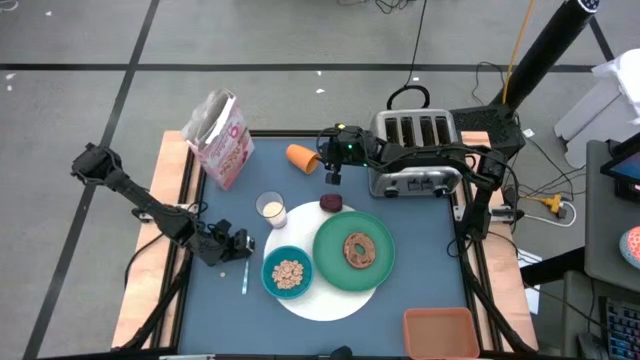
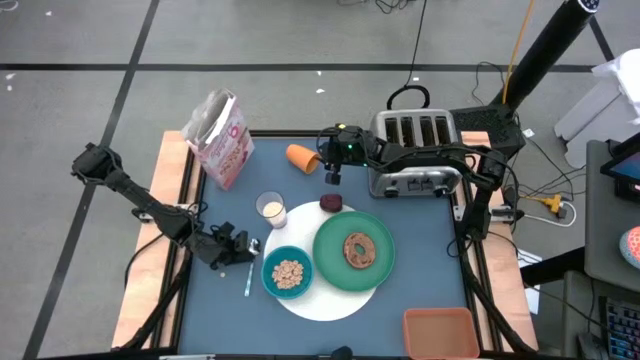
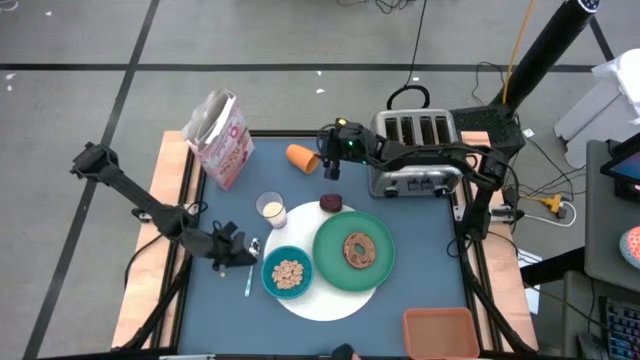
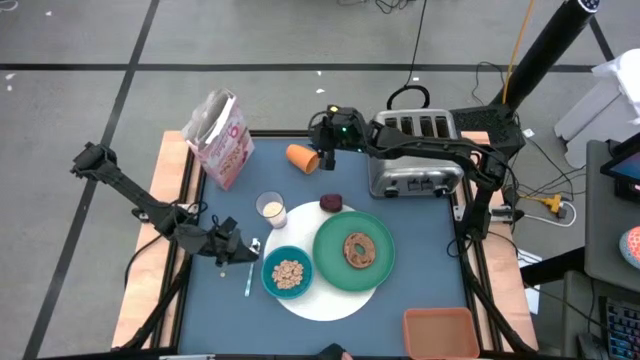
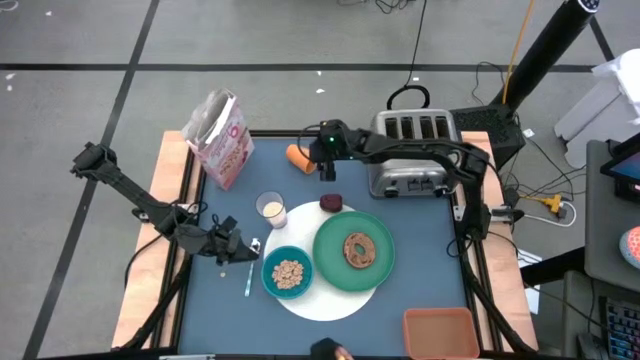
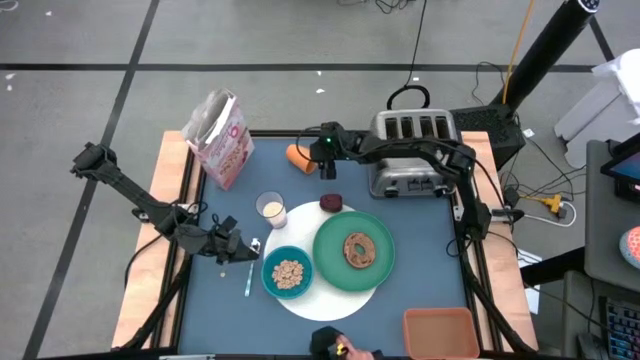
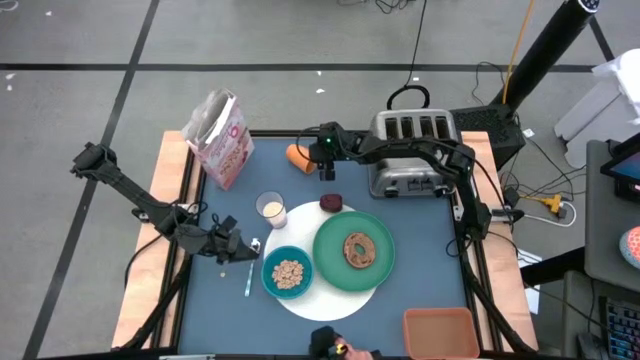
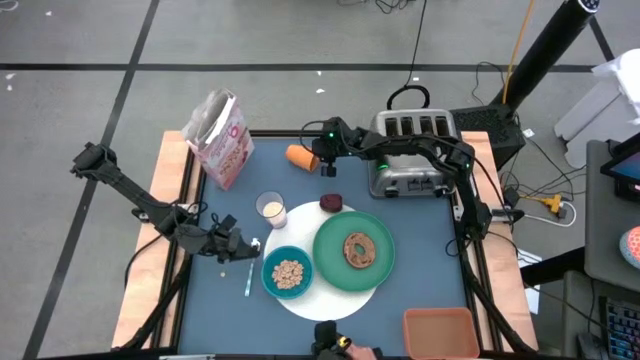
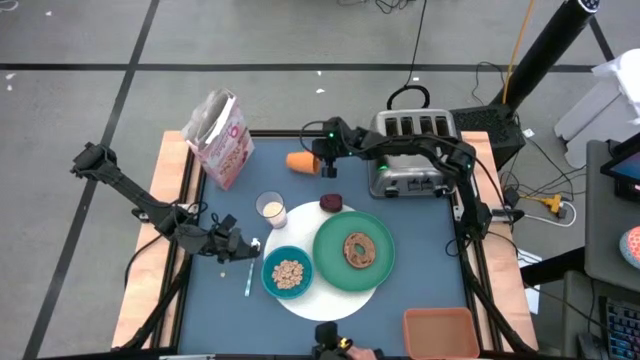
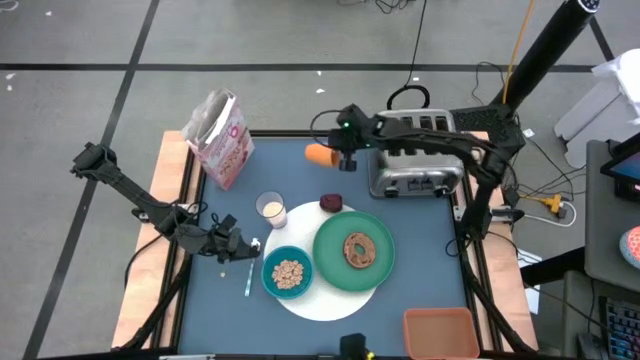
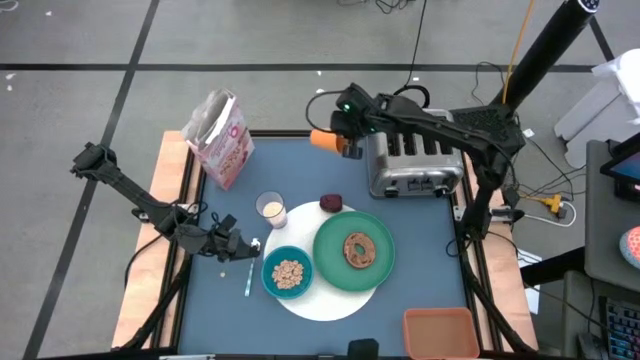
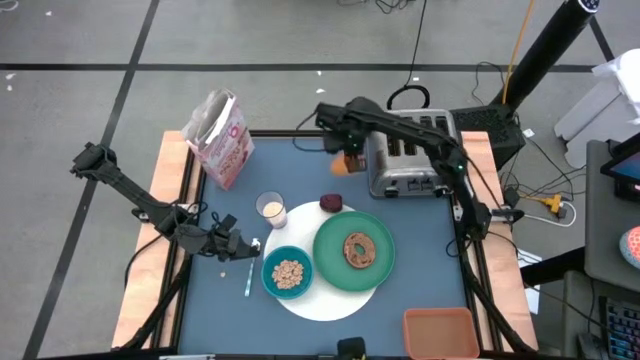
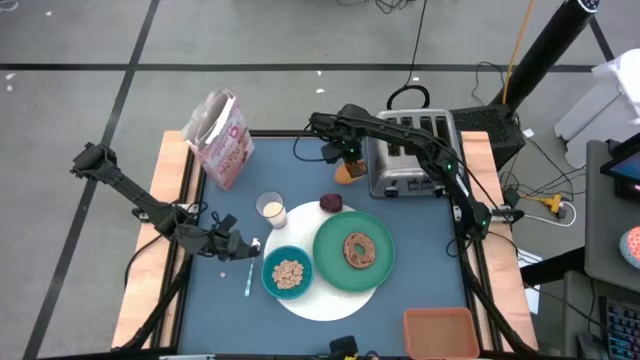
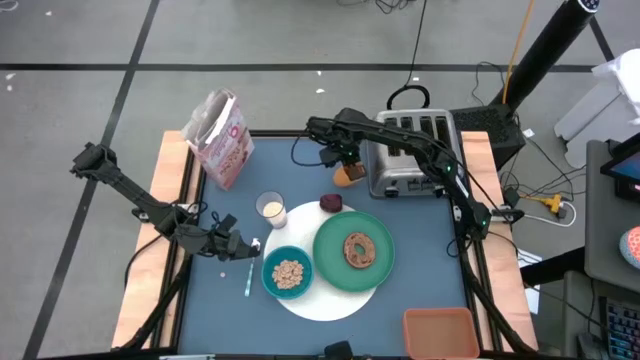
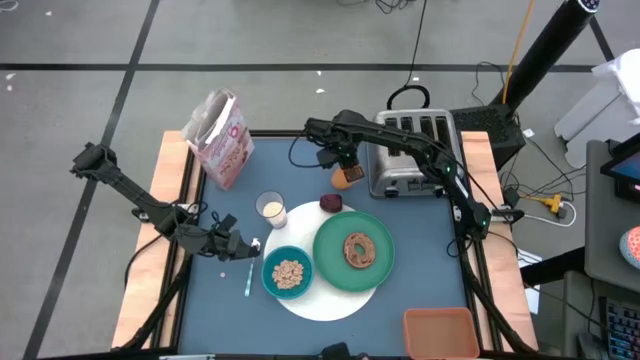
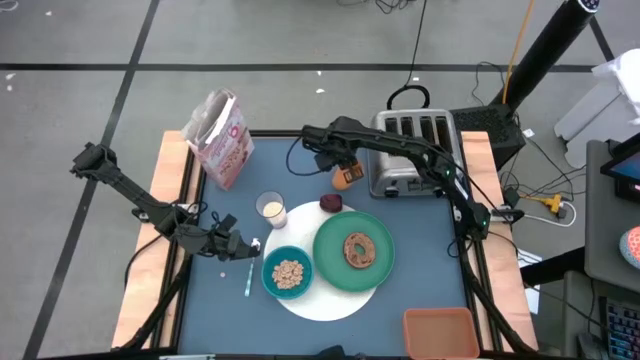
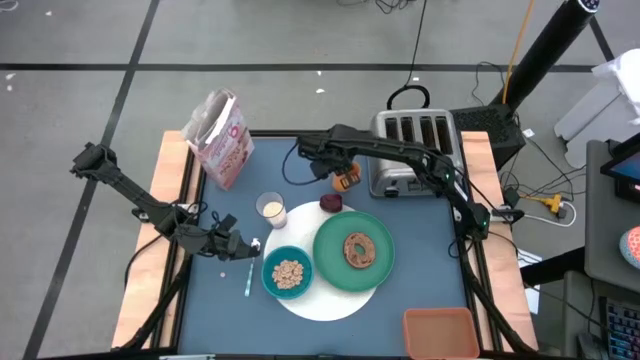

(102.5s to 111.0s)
Task: Arrange a breakfast setting
Adjust the orange cup

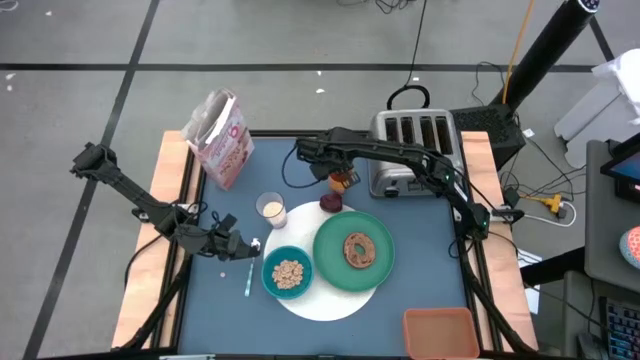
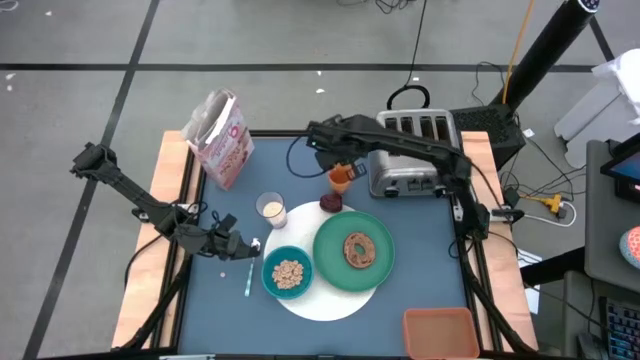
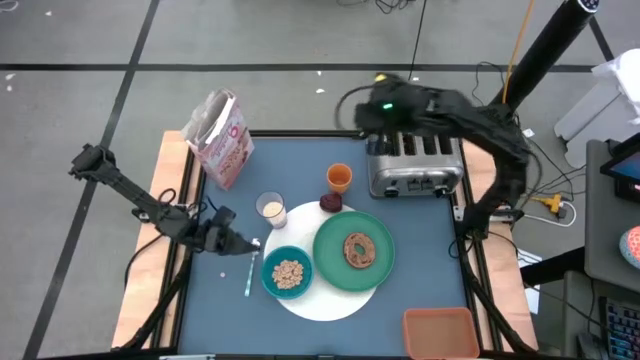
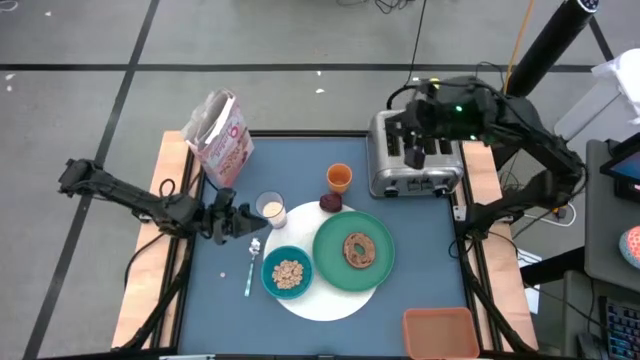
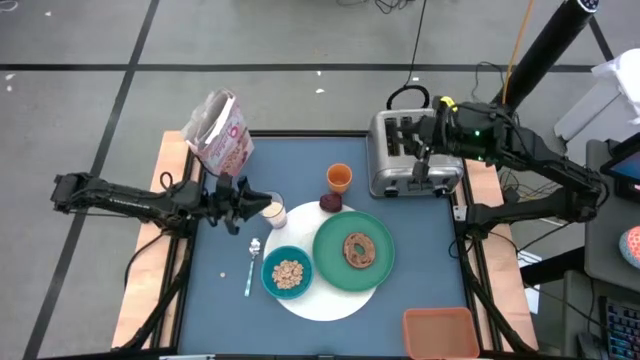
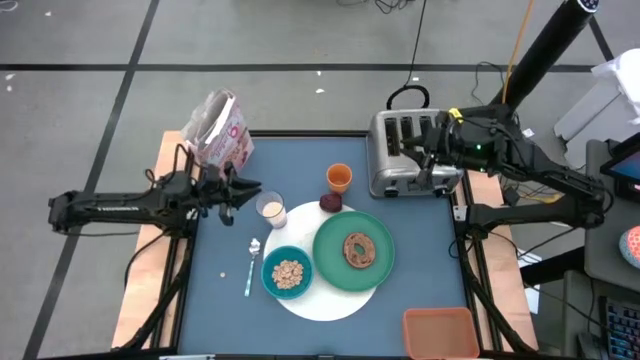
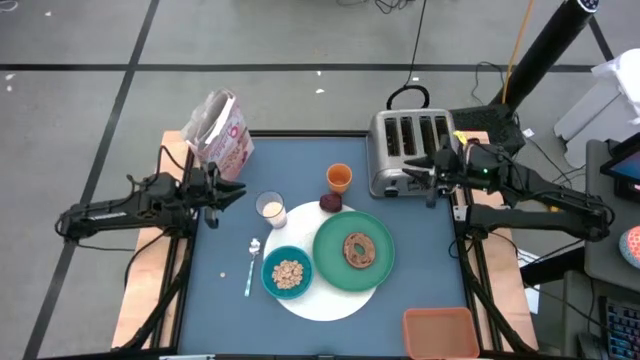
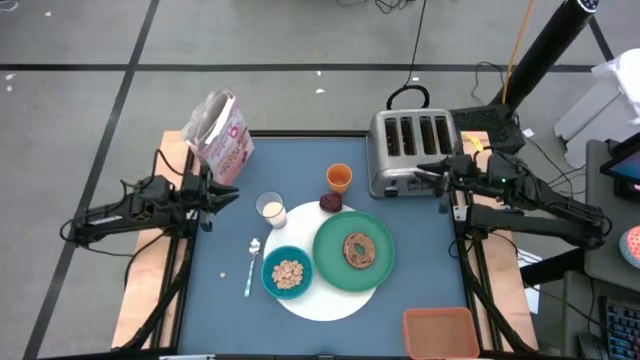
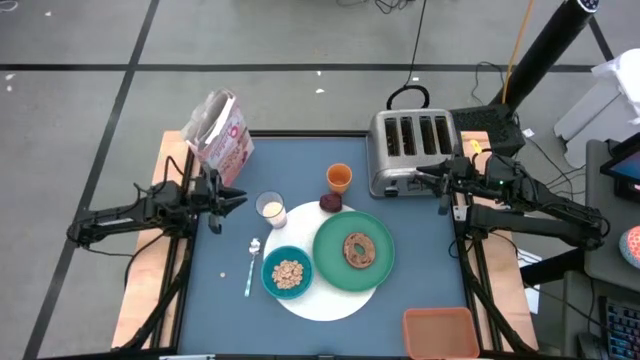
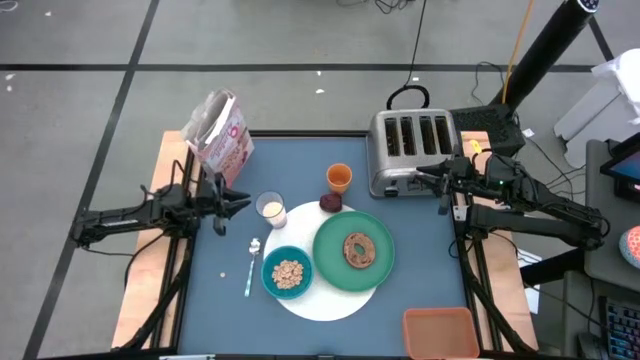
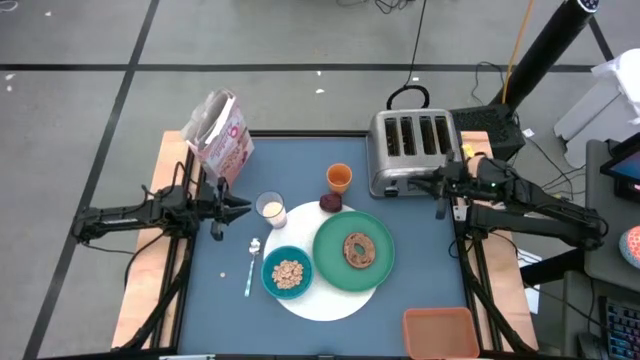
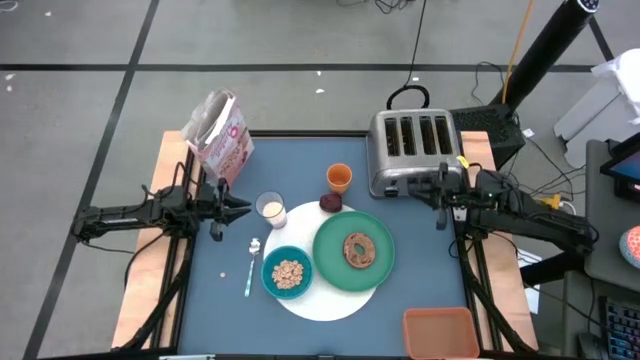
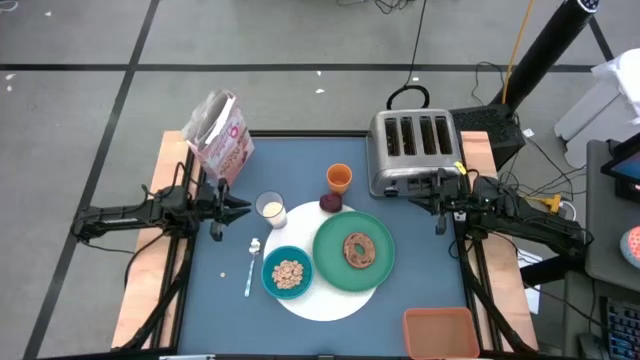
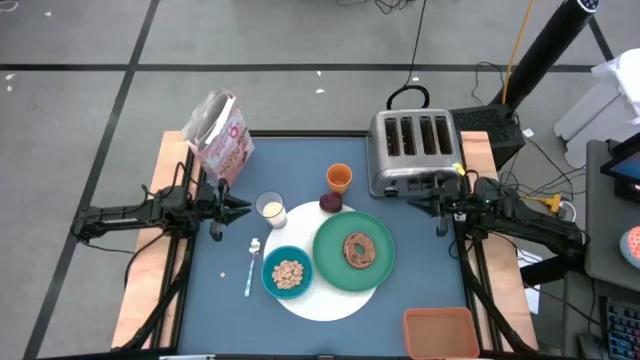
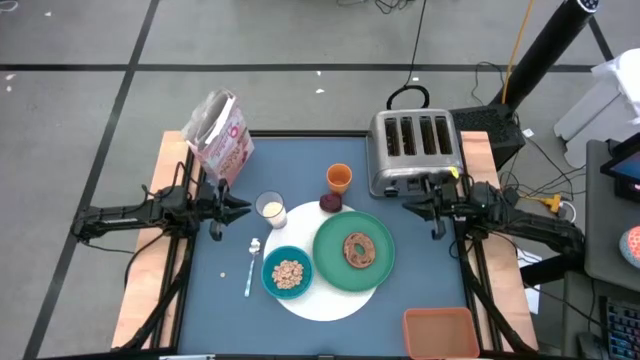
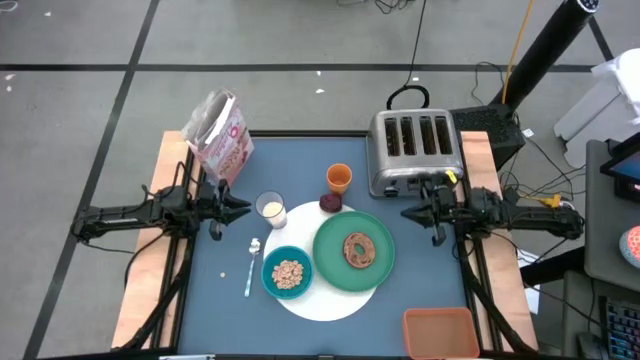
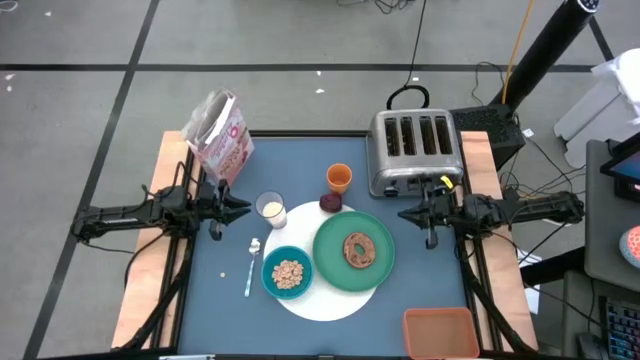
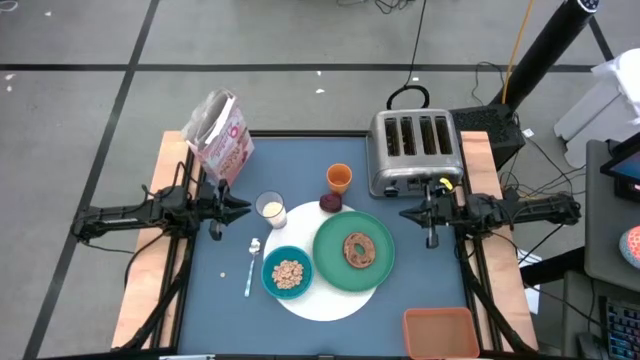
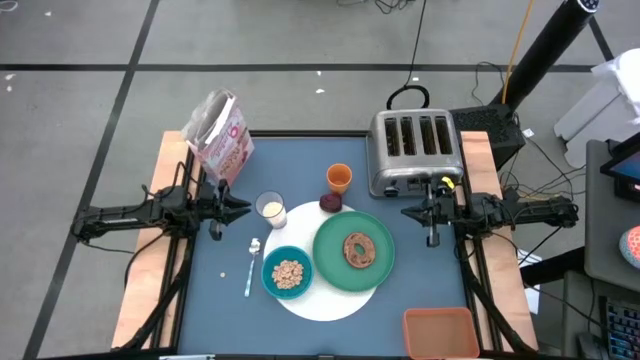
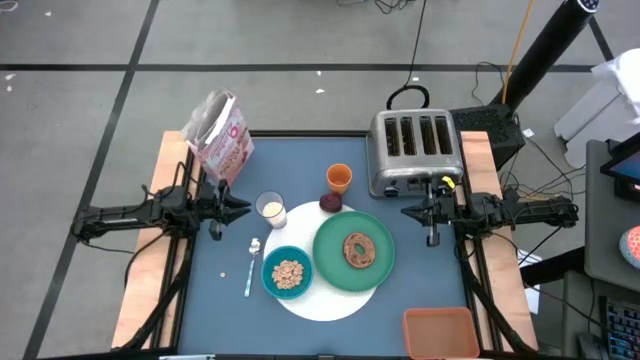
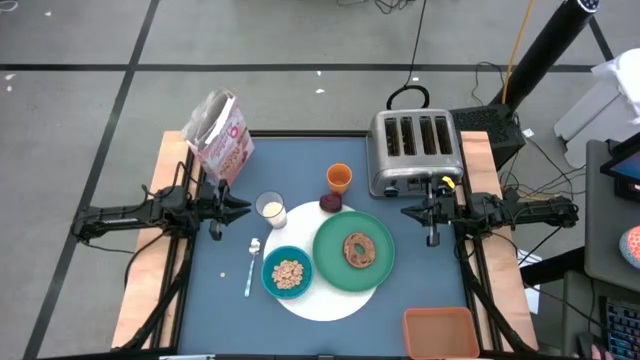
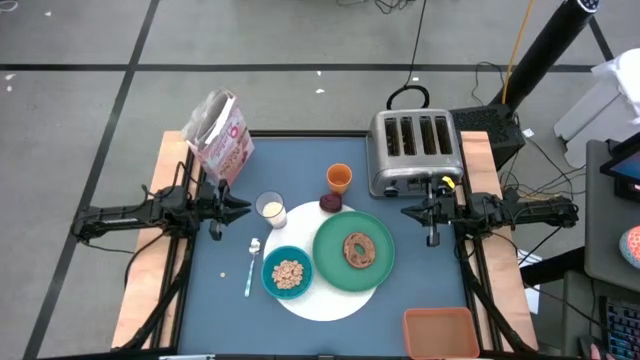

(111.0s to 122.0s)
Return to Home Position

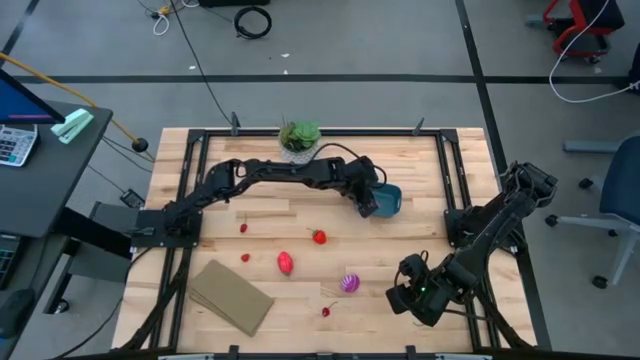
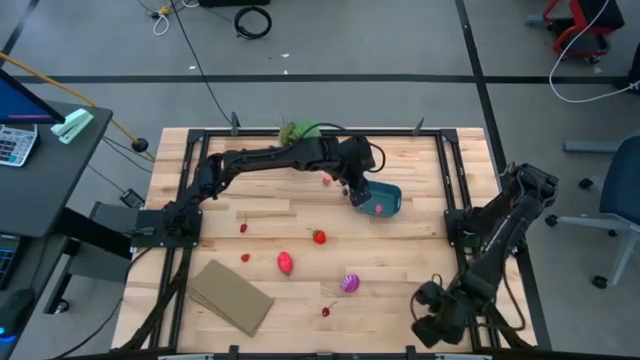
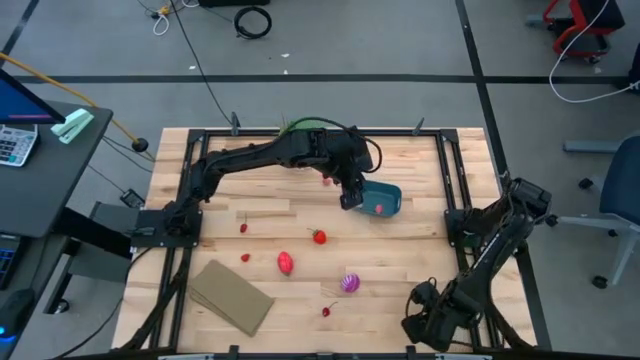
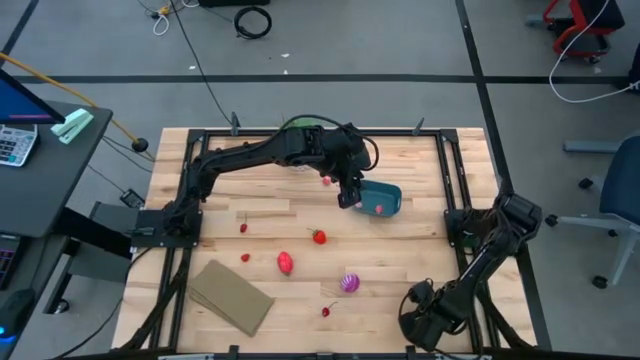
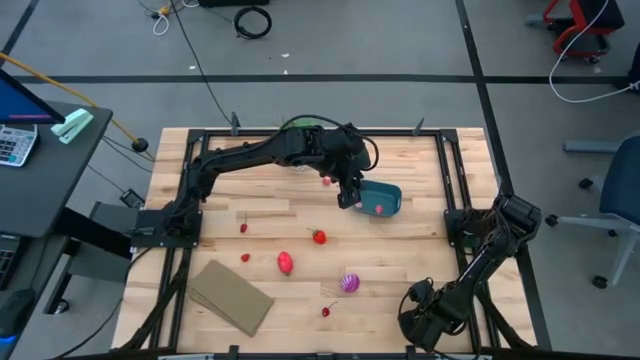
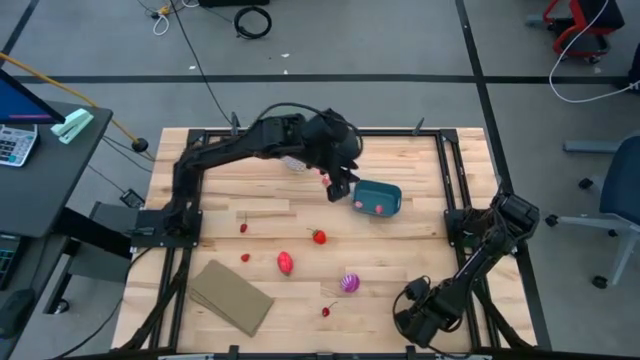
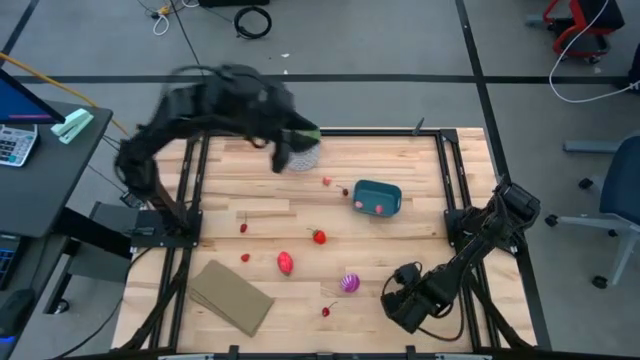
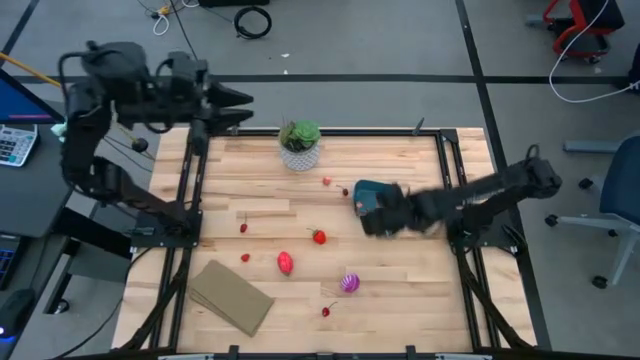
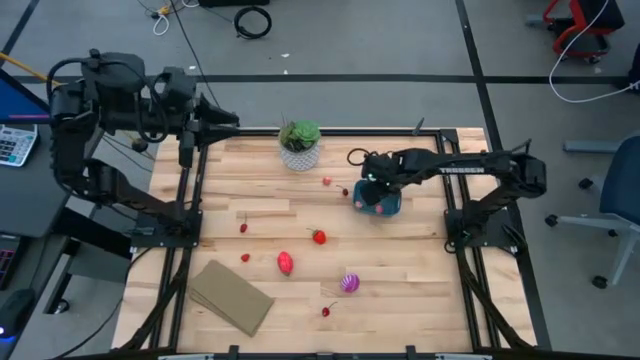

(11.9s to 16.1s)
Task: Pick and placing Produce into tupperware
Put the red cherry into the blue bin
